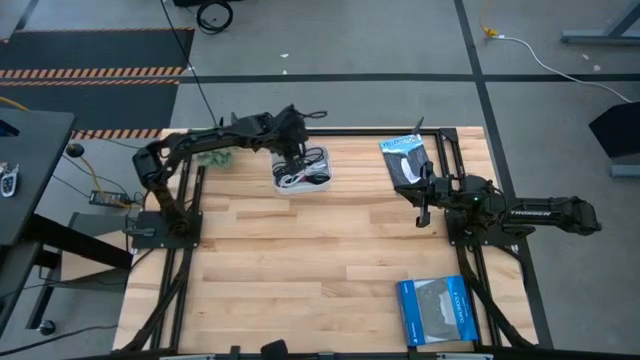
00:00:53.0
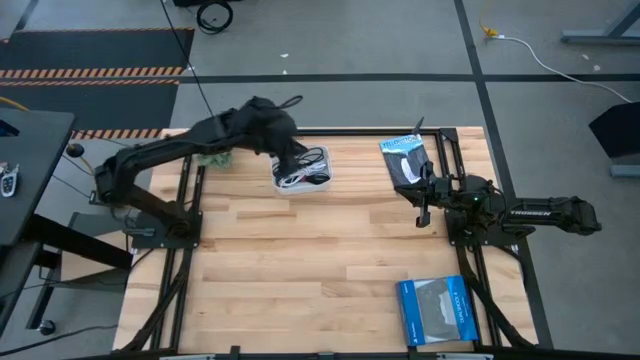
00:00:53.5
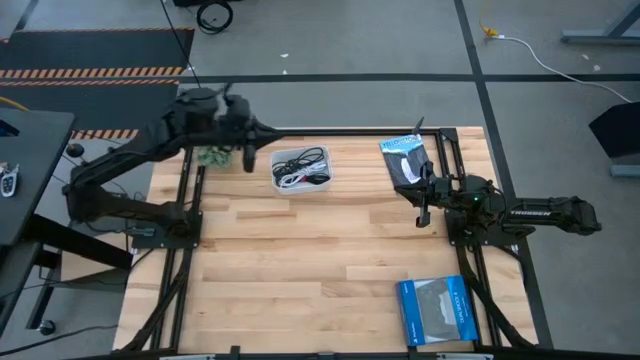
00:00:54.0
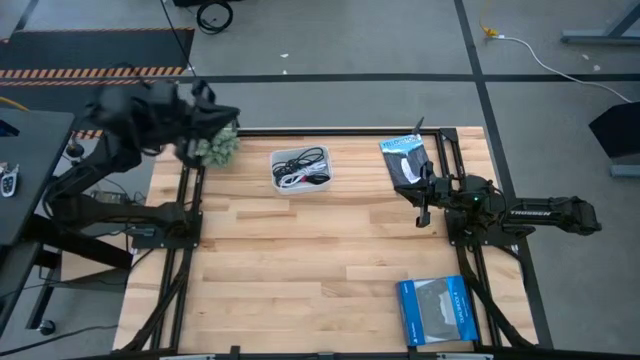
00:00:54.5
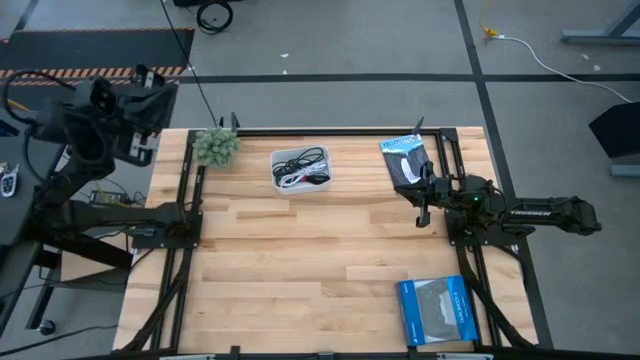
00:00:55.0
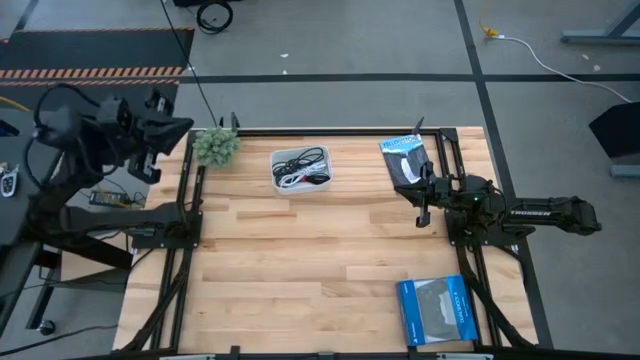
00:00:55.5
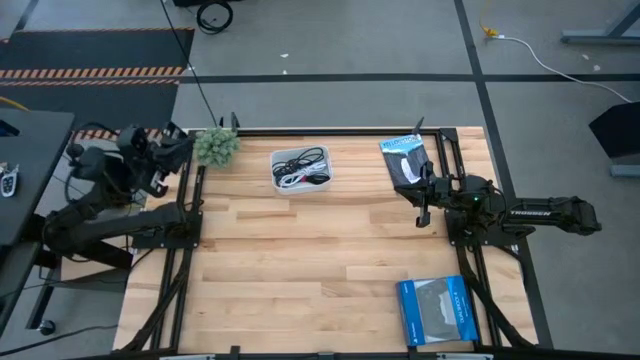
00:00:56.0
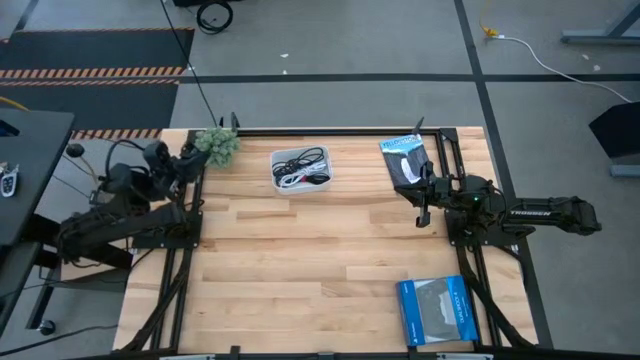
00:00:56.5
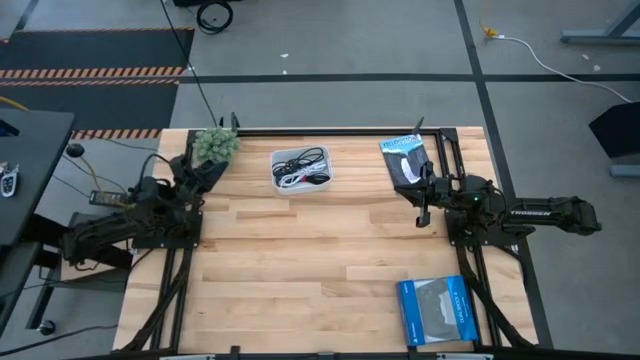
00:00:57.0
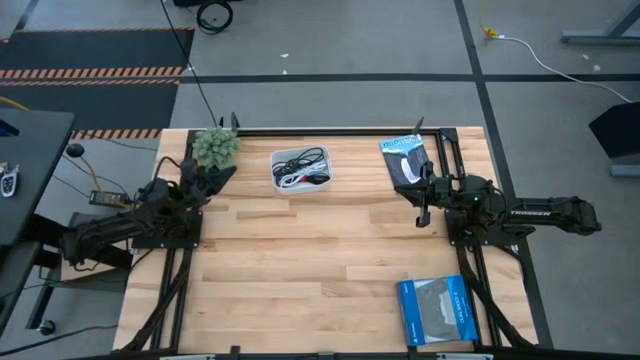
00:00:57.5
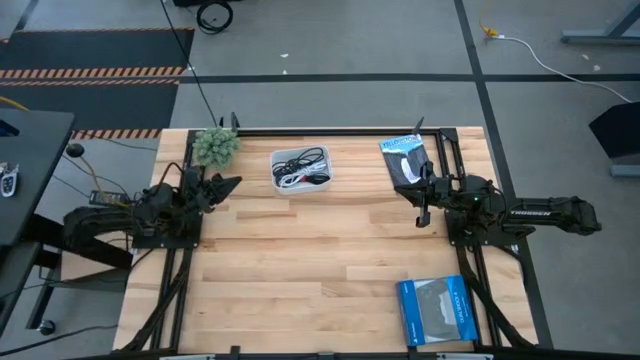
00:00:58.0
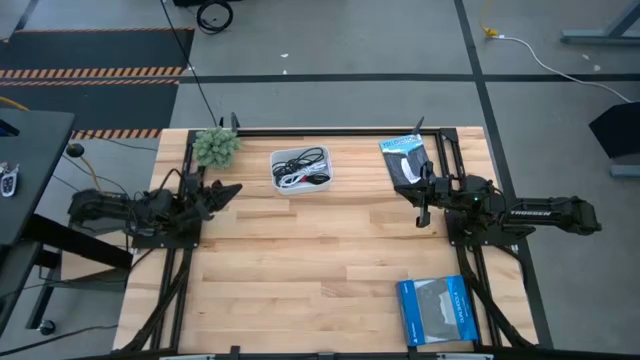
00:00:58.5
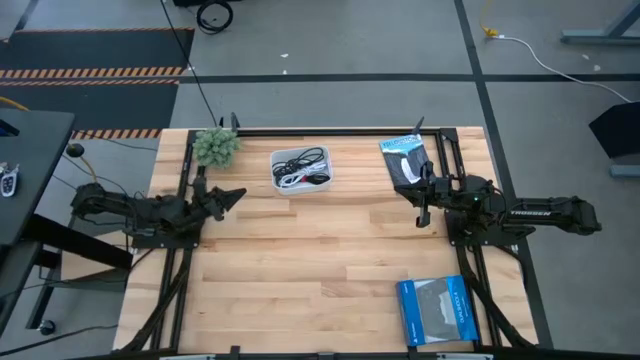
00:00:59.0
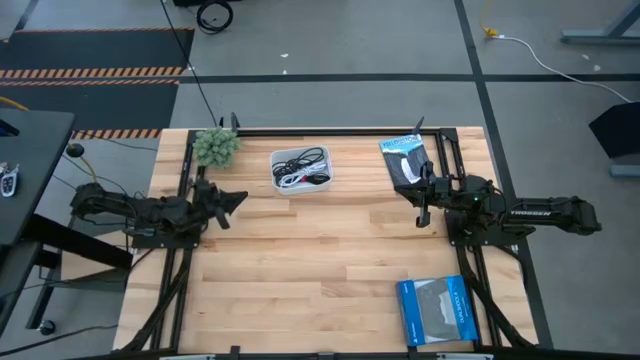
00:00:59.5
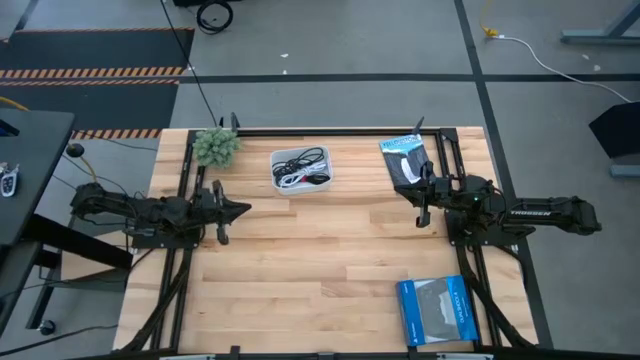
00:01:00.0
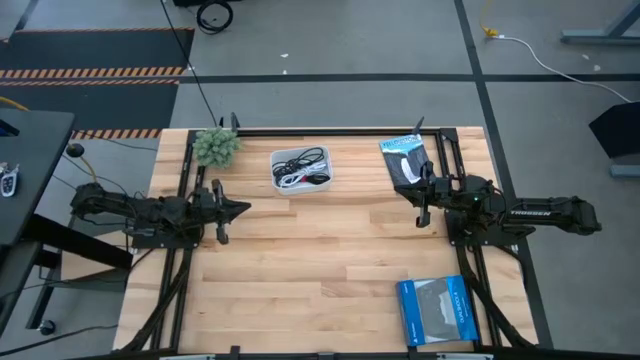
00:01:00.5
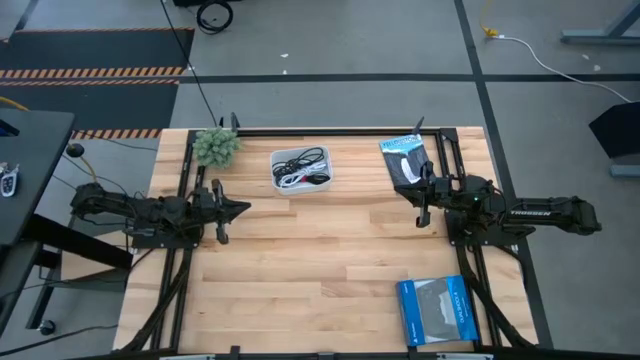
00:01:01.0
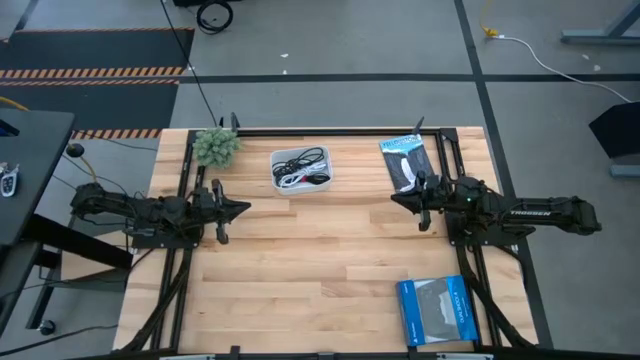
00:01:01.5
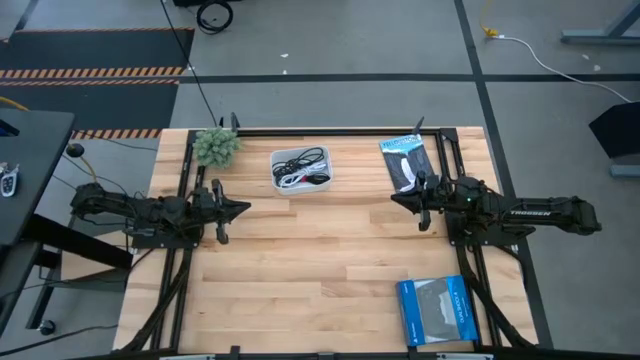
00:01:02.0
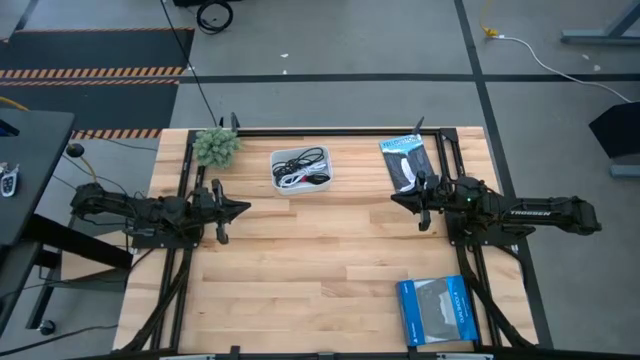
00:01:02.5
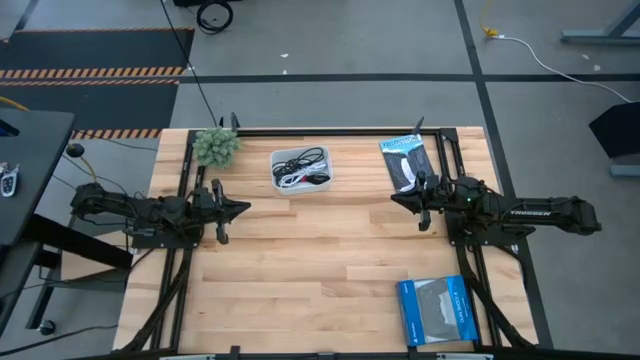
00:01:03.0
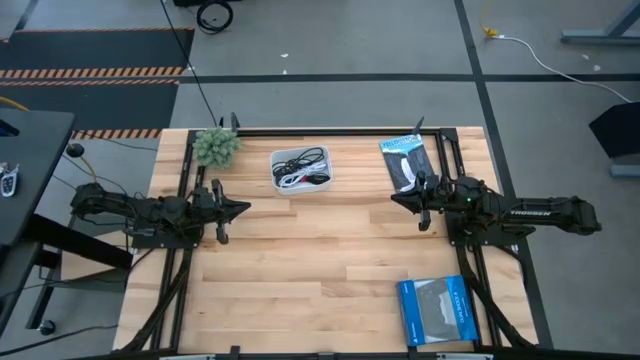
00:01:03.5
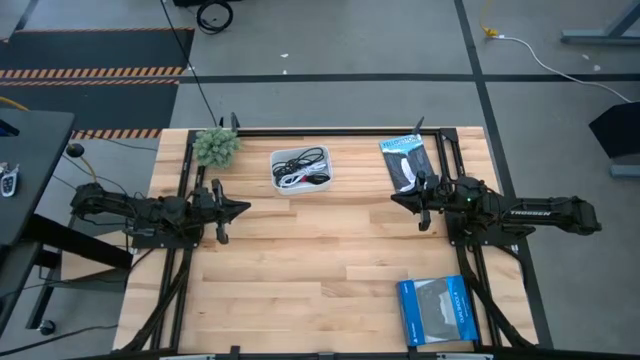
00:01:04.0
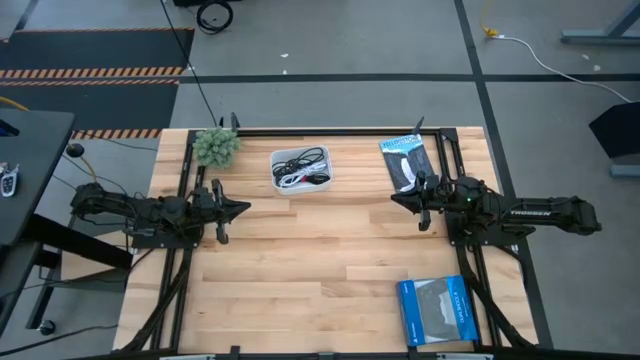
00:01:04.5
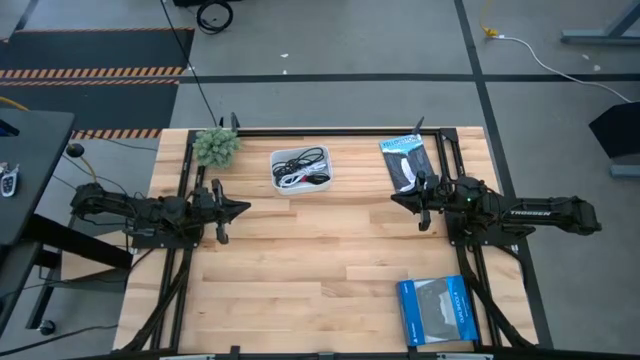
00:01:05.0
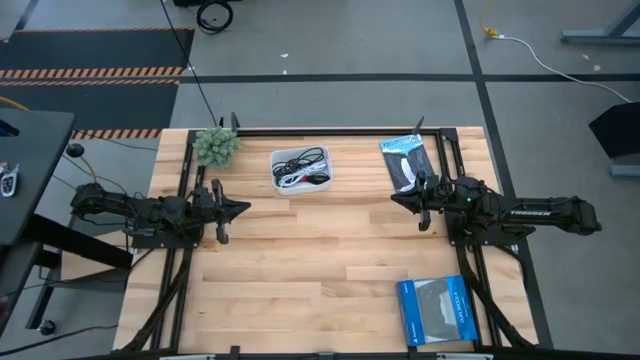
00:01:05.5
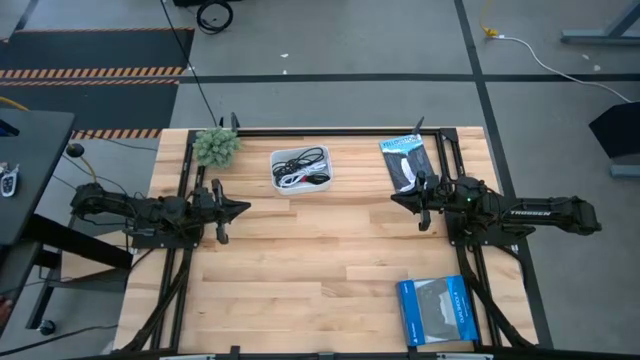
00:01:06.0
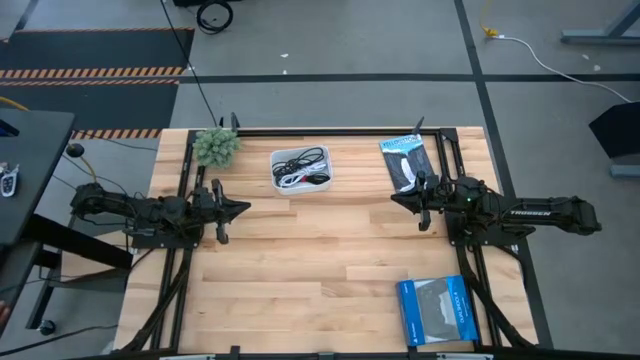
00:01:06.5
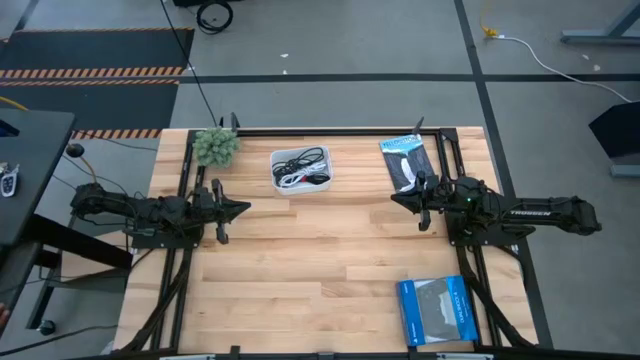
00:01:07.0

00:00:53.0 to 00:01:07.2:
Task: Pick and place USB-C Cables
Return to Home Position

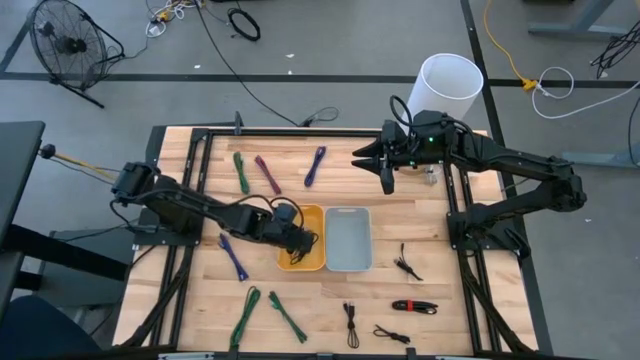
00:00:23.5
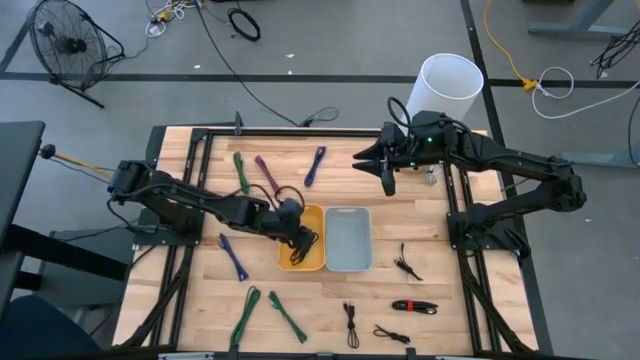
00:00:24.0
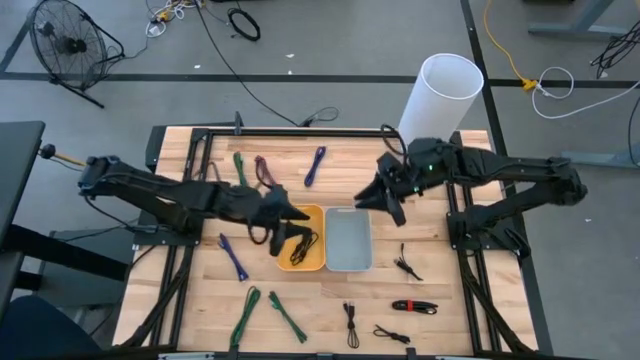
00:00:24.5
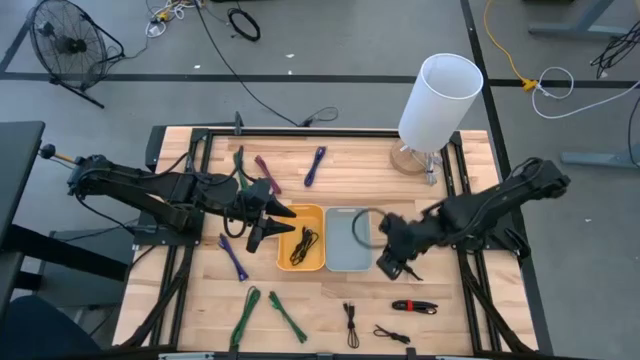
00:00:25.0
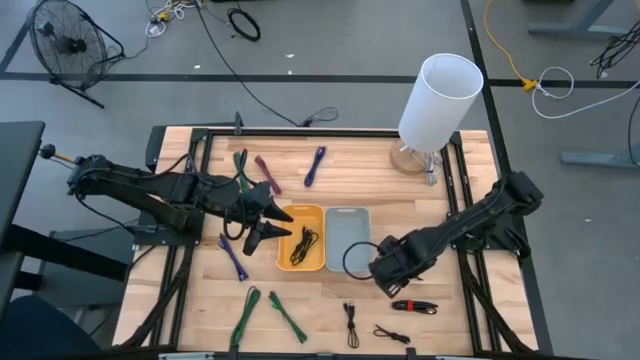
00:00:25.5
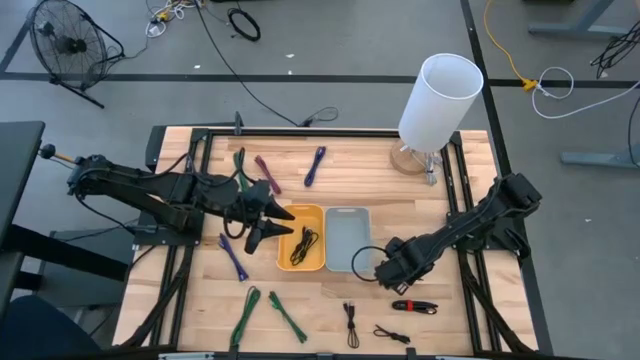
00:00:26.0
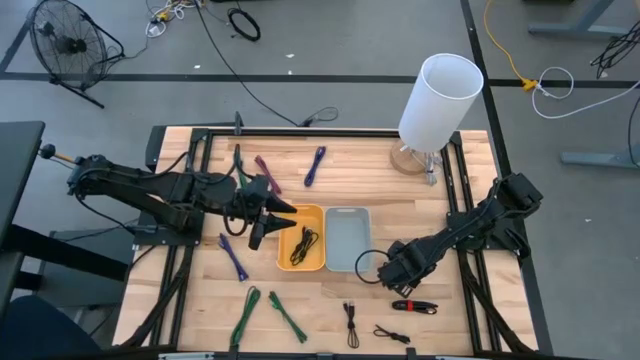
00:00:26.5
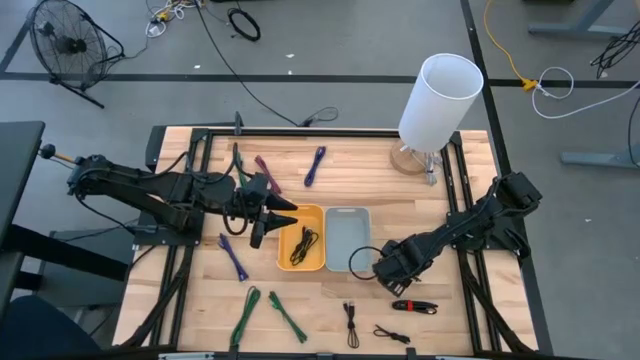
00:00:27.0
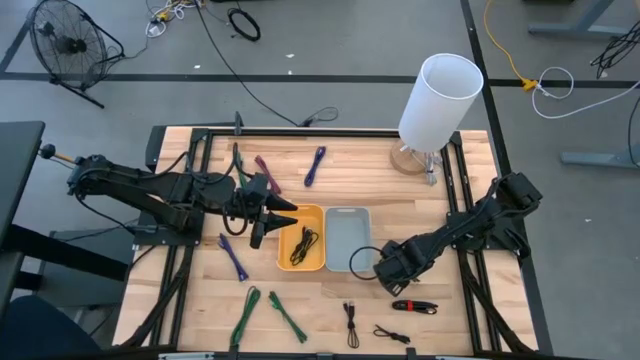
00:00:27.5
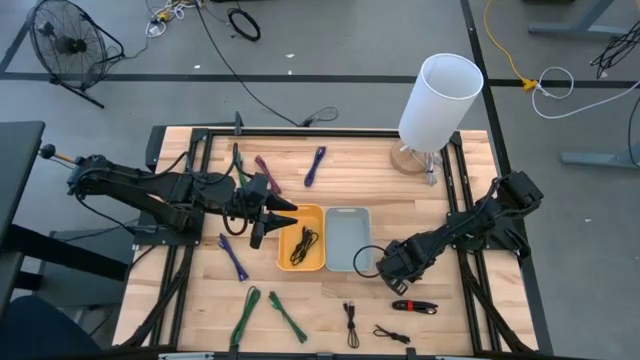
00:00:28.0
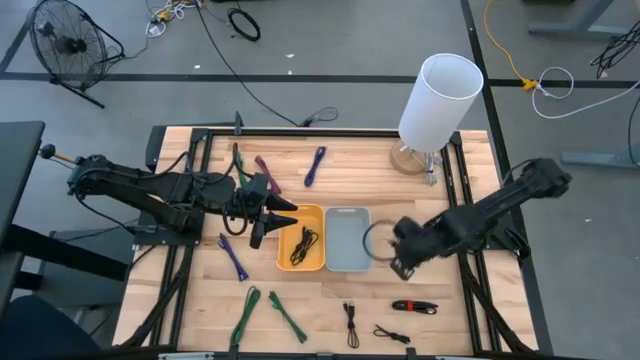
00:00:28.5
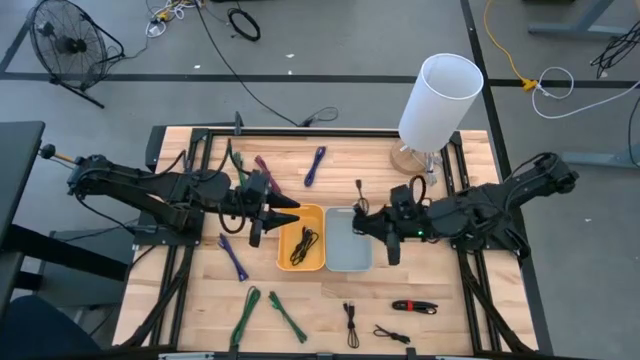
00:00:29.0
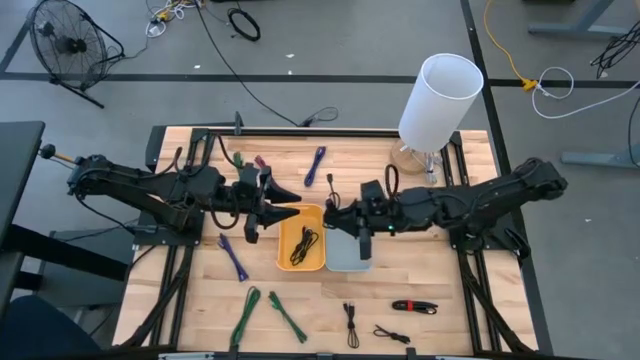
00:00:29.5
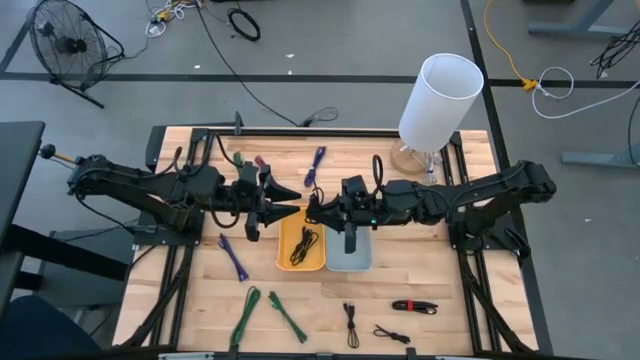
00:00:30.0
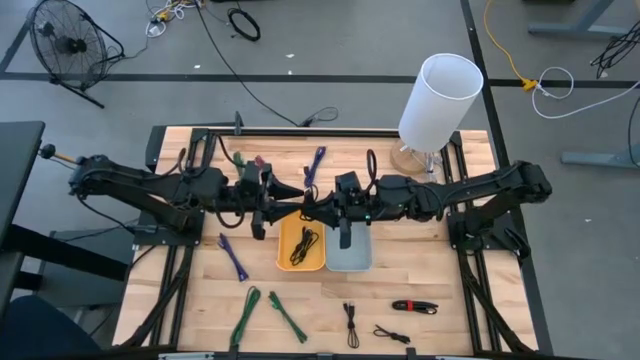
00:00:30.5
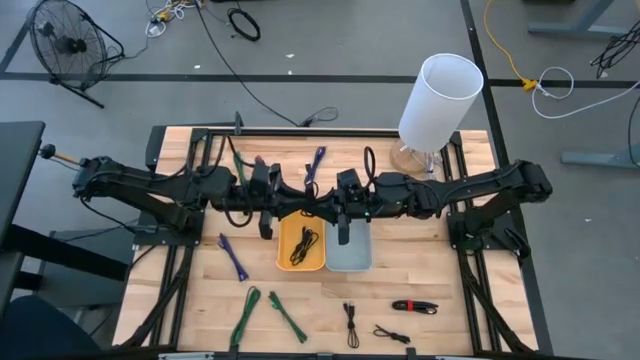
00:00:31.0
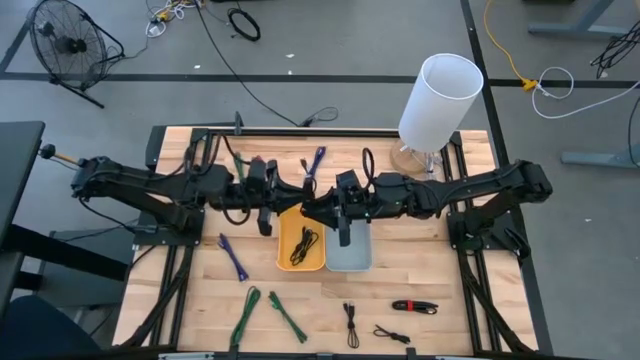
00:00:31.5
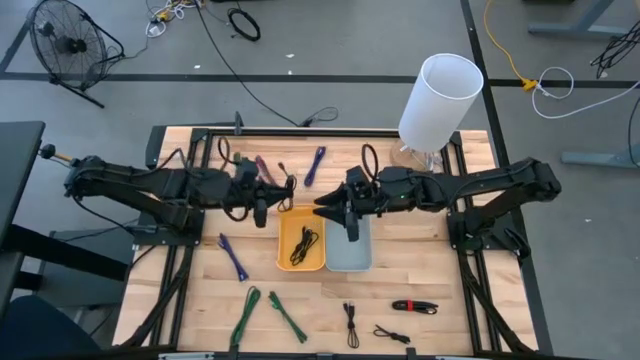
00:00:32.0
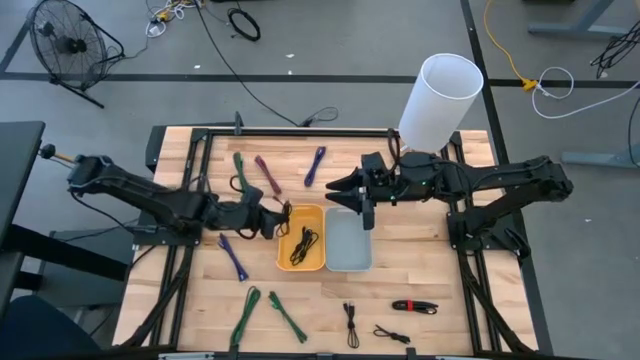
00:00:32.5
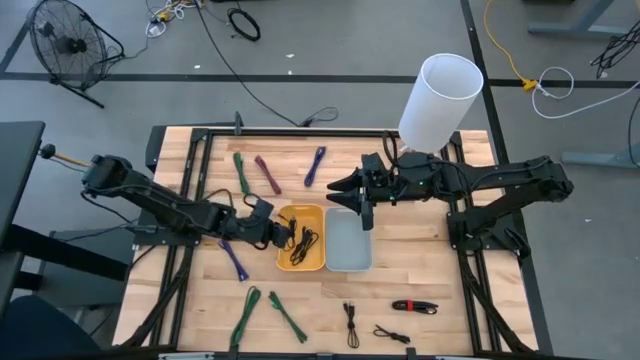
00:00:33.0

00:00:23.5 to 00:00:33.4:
Task: Pick & Place USB Port
Put the black charger cable into the yellow bin
